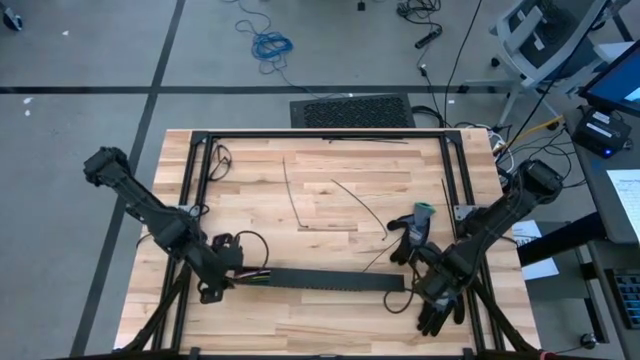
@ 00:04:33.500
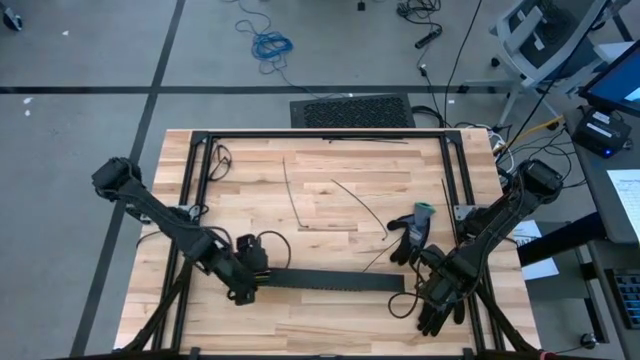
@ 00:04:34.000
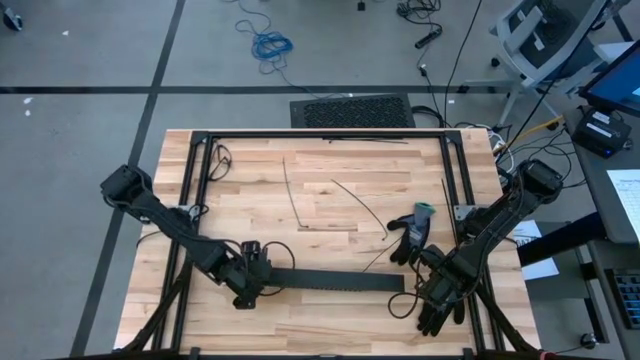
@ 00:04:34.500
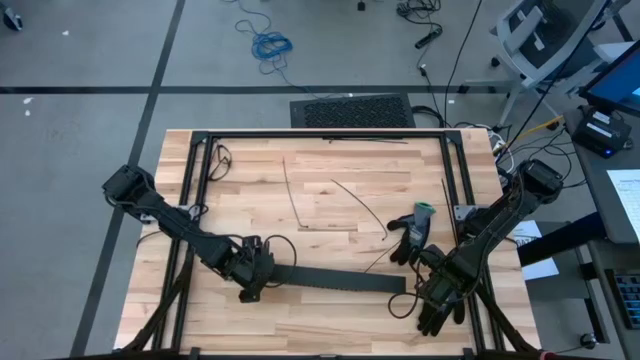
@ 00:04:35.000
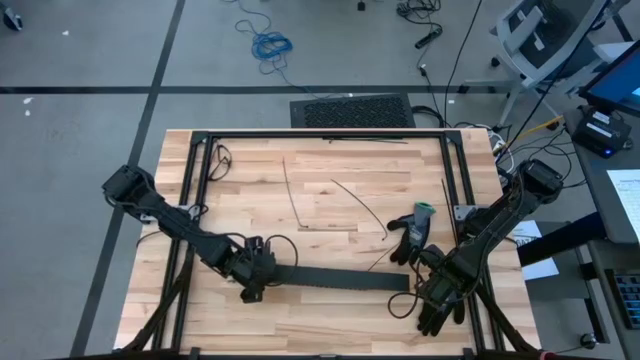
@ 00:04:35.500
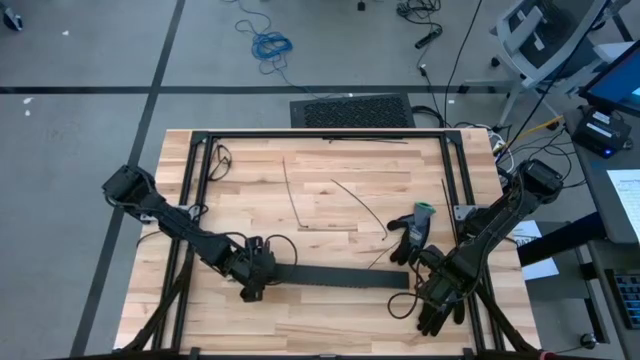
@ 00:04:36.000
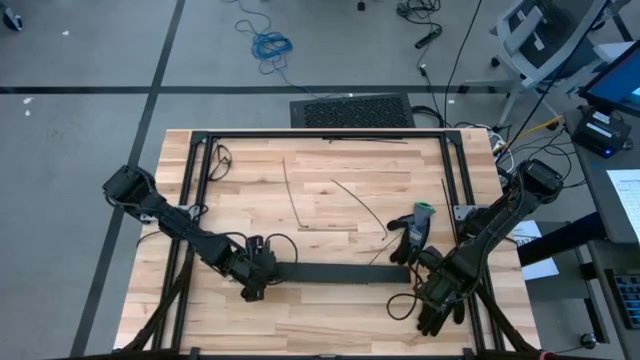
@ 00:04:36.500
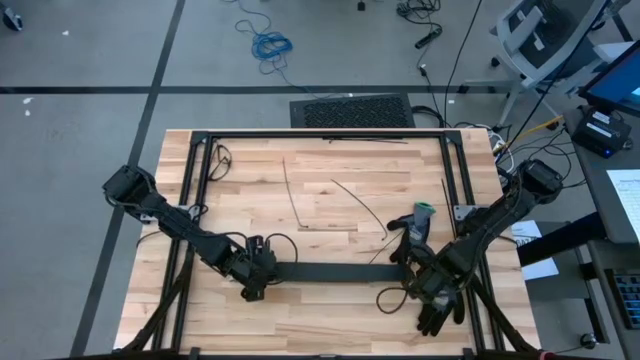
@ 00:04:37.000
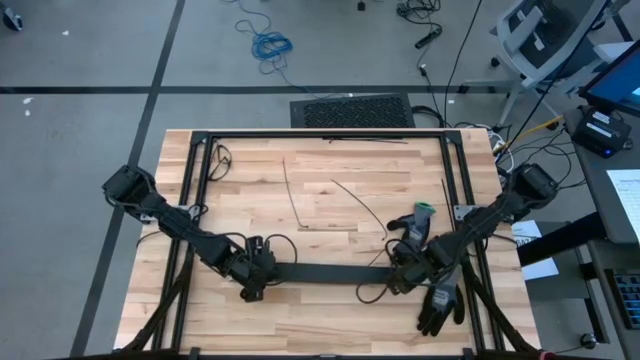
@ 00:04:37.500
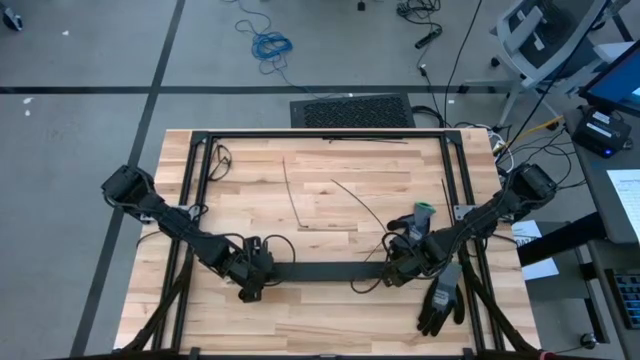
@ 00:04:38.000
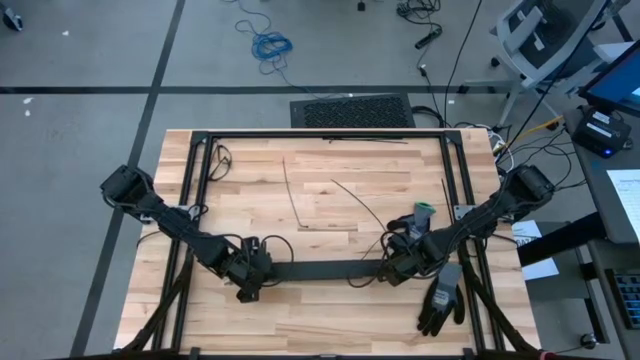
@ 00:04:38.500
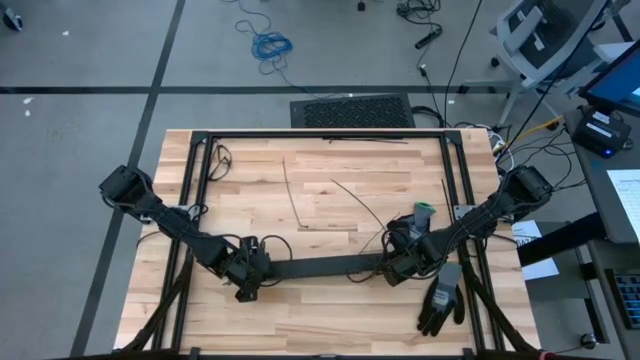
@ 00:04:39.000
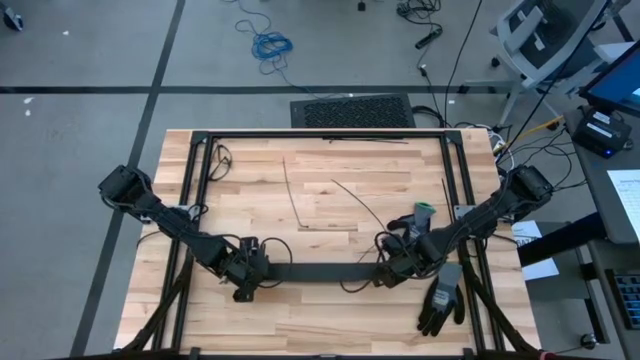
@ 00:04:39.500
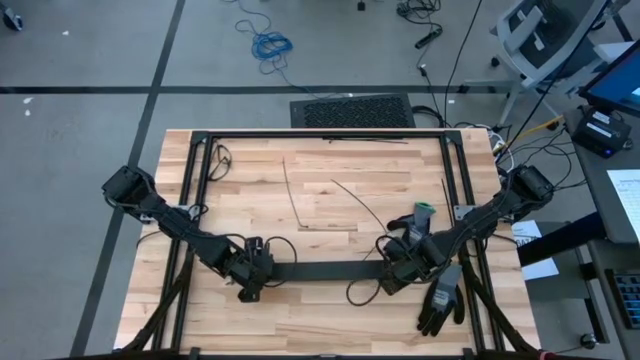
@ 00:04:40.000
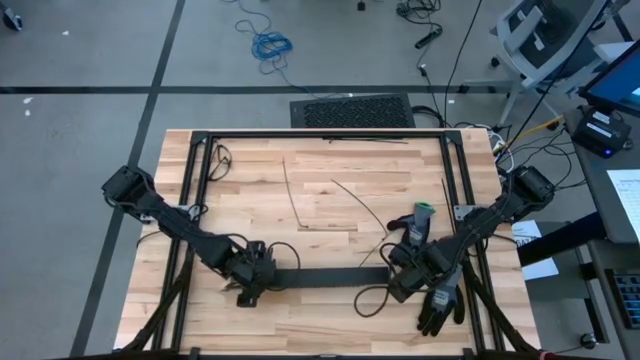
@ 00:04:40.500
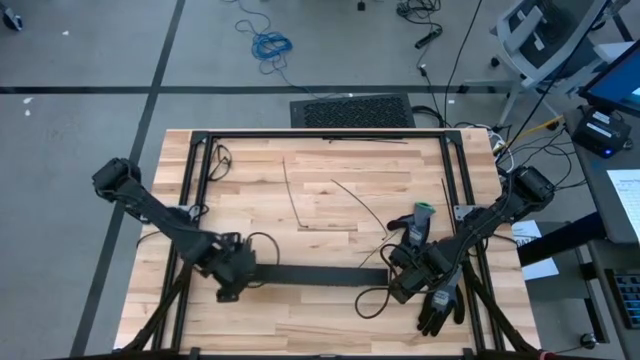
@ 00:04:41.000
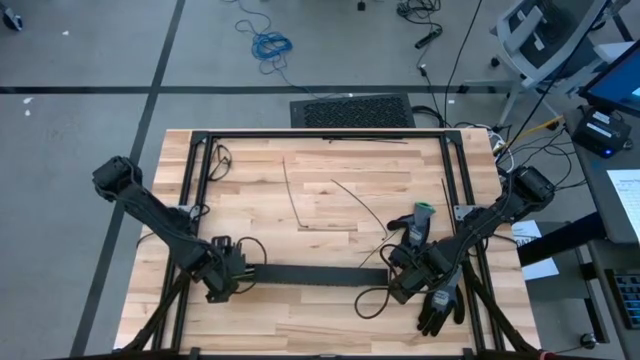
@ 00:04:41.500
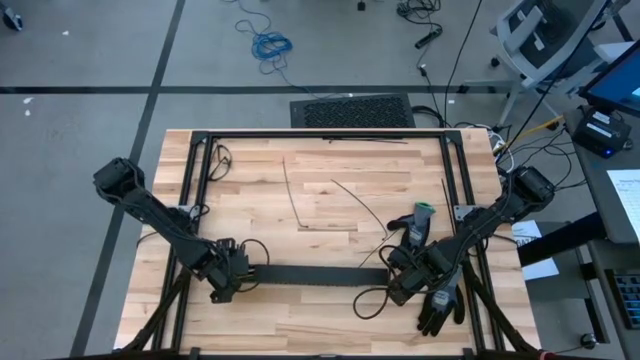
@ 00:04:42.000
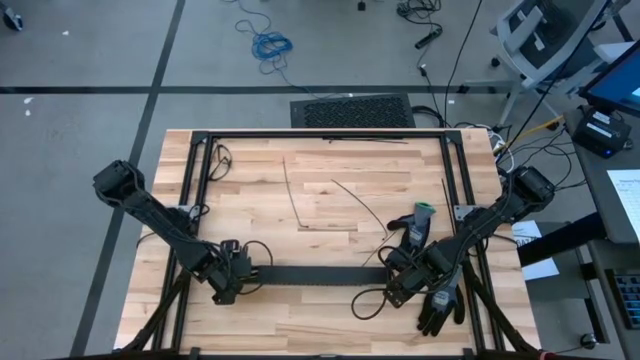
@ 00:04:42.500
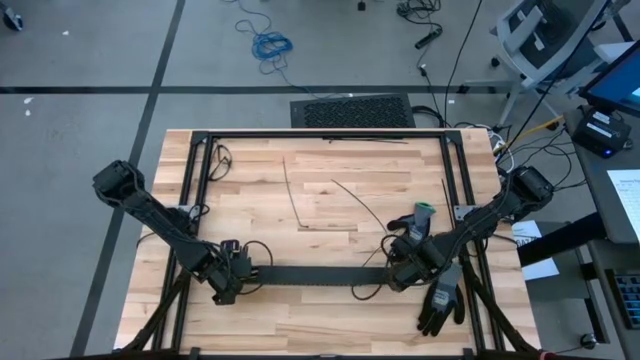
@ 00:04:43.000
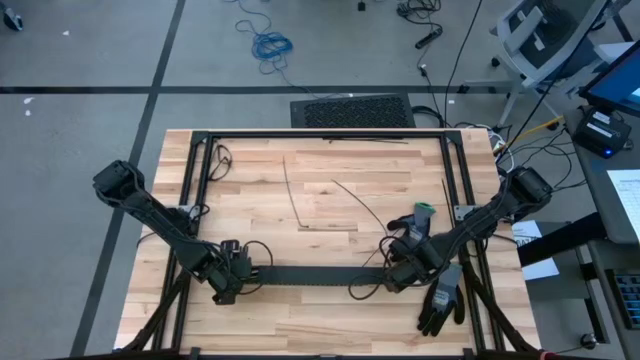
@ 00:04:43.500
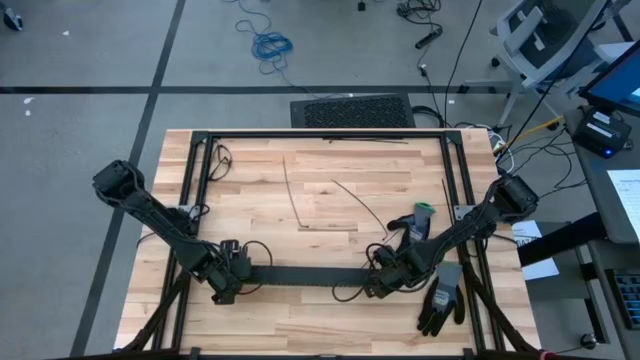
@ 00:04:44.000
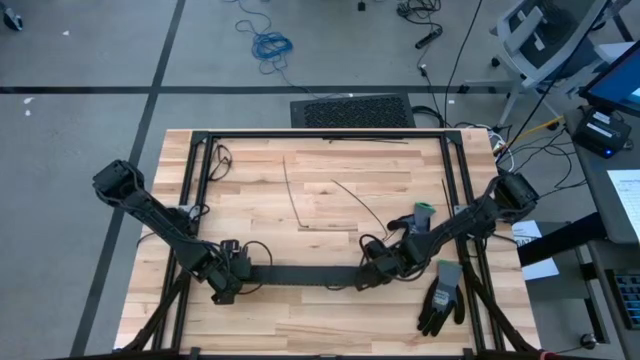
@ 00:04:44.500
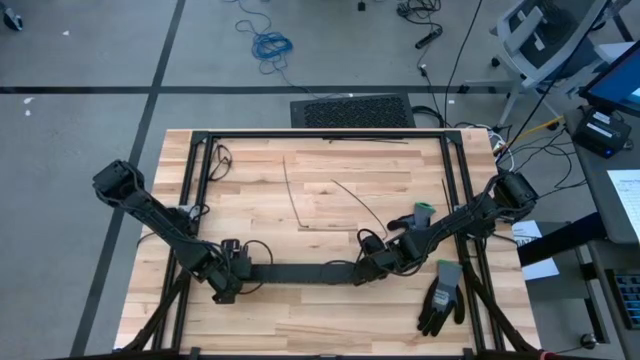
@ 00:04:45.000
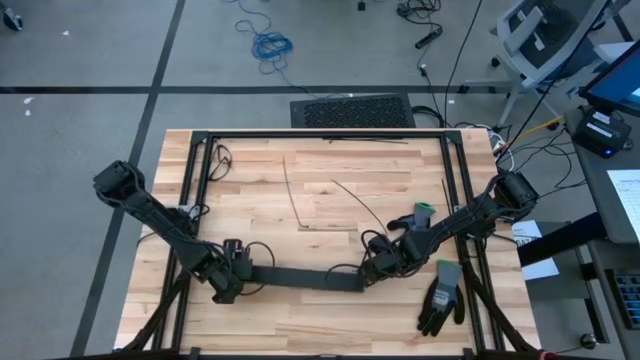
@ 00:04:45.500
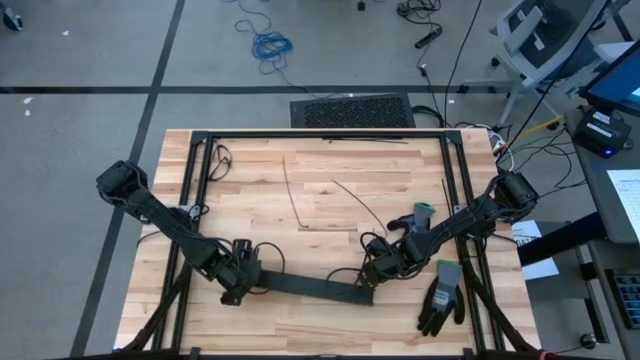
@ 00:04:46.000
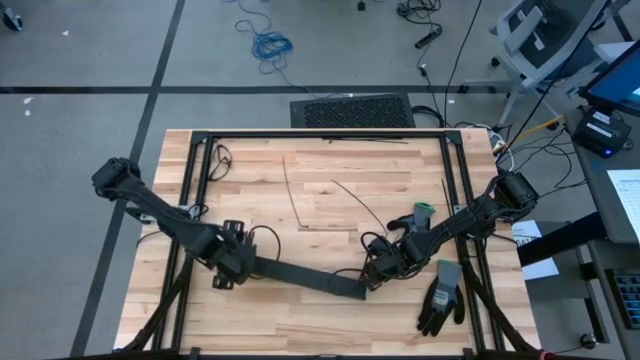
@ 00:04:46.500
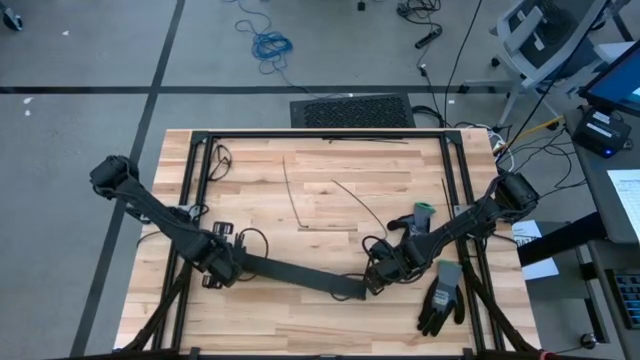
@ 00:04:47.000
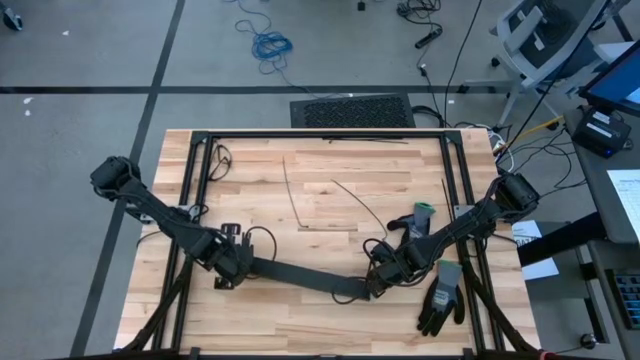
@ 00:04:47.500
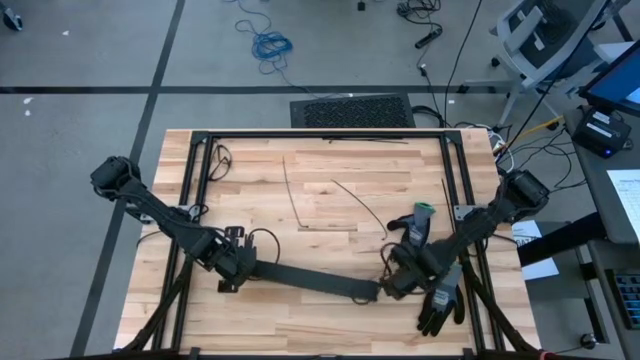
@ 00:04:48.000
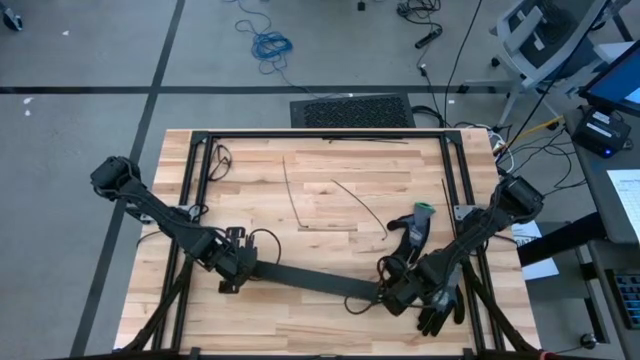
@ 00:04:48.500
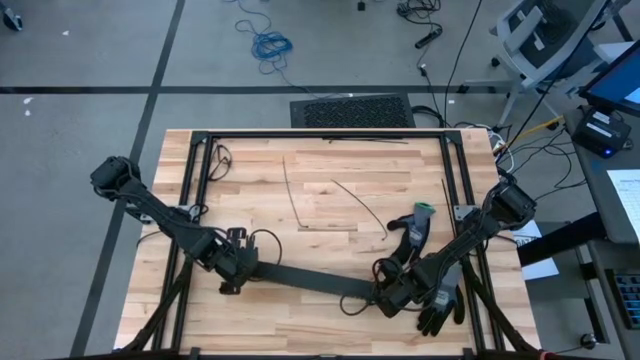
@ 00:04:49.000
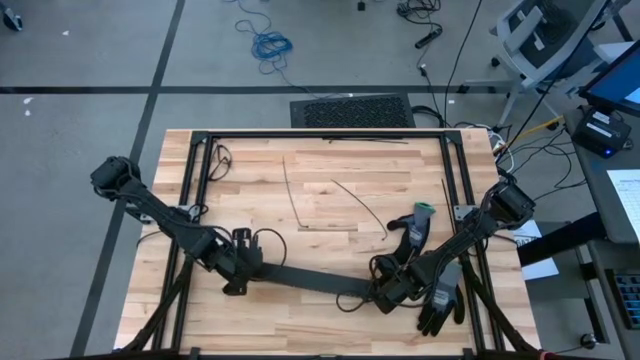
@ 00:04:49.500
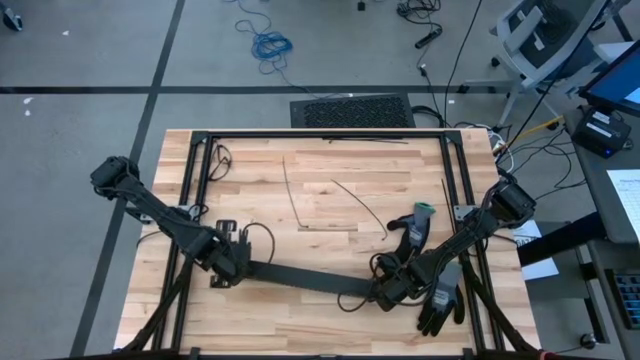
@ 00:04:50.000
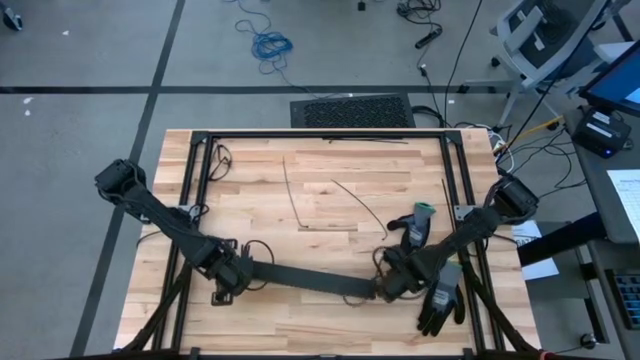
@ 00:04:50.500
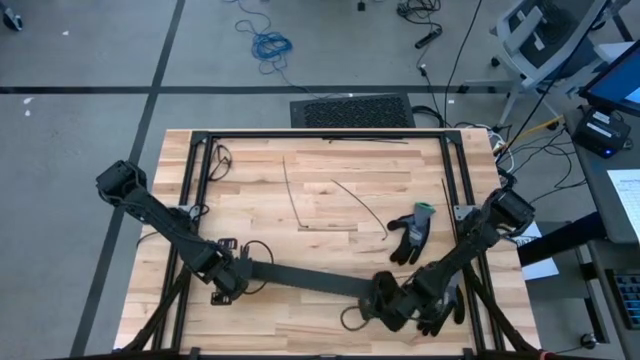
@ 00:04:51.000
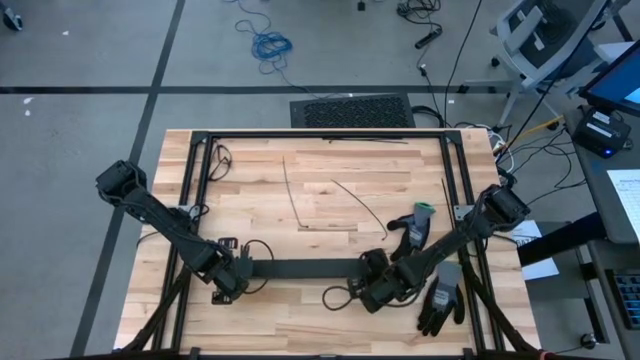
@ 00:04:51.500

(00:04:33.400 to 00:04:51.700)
Task: Ziptie cables
Close the black cable duct
